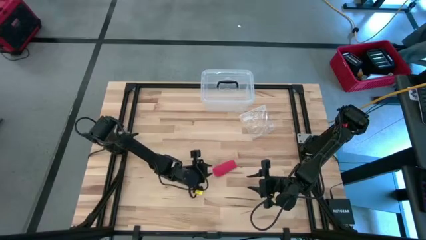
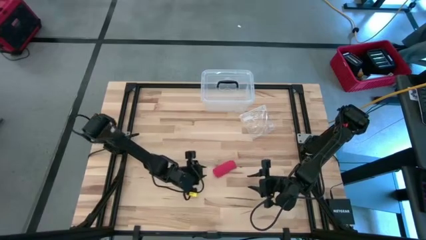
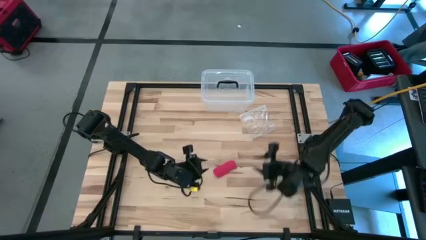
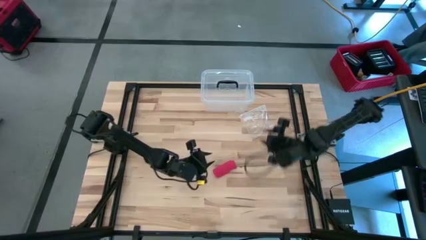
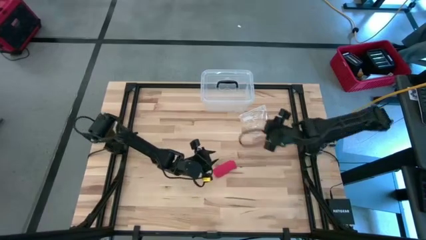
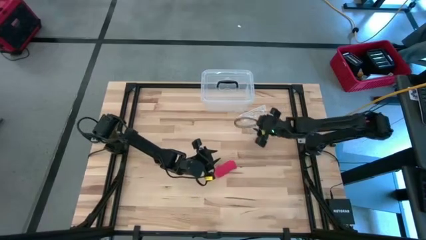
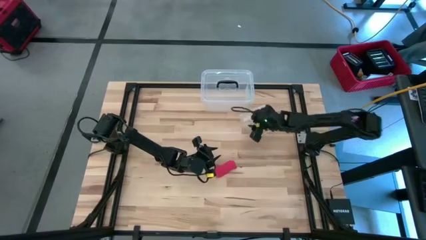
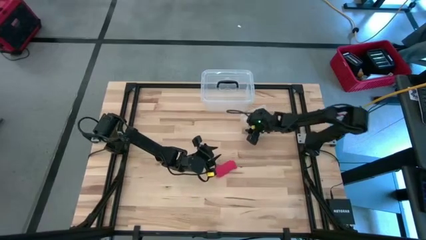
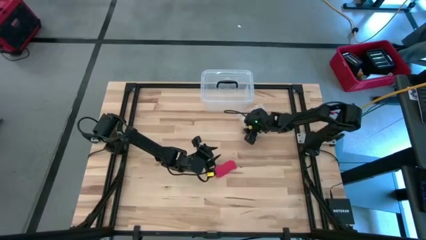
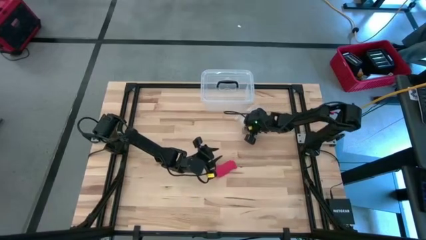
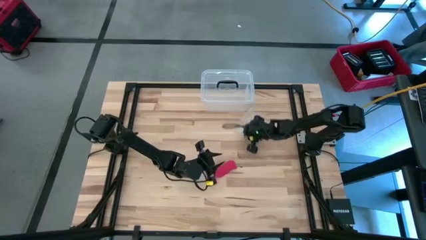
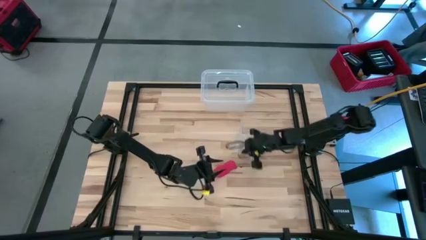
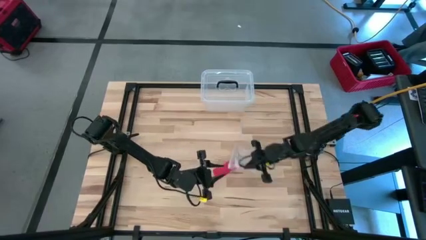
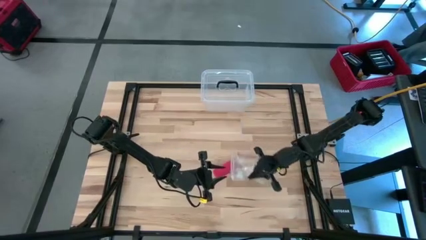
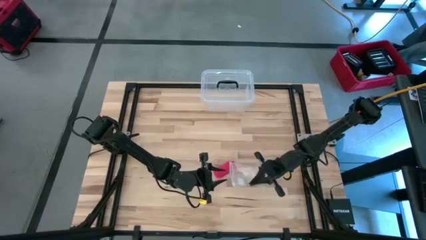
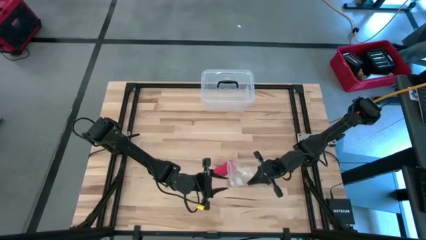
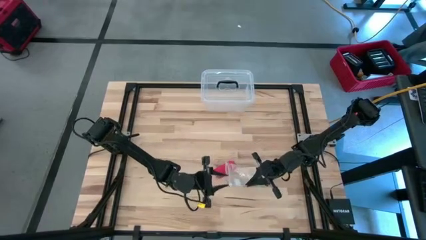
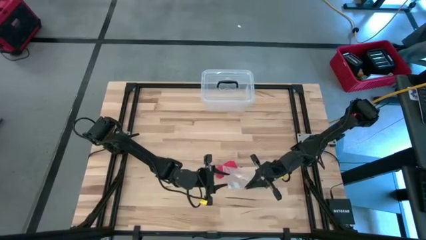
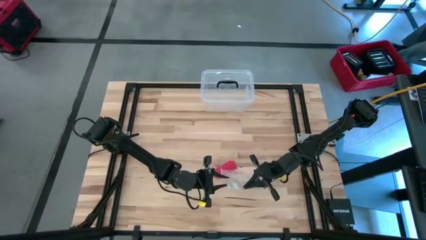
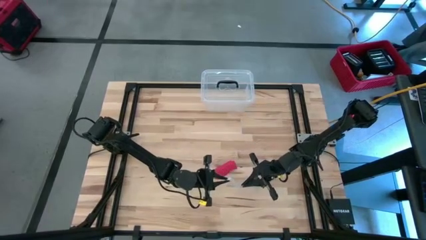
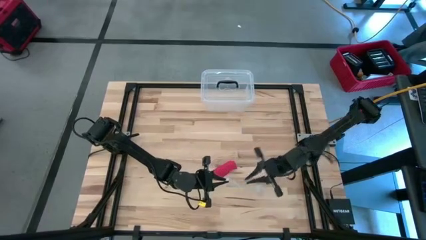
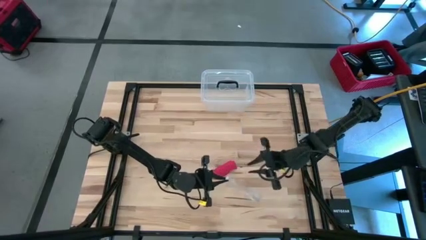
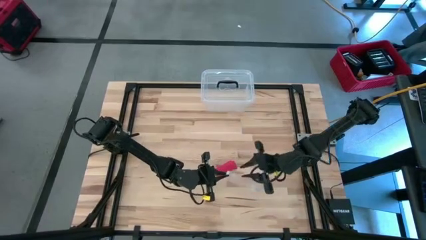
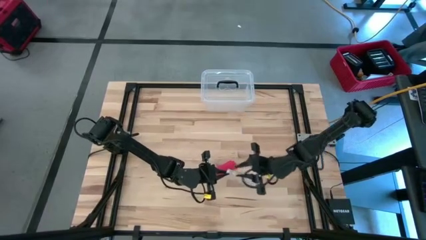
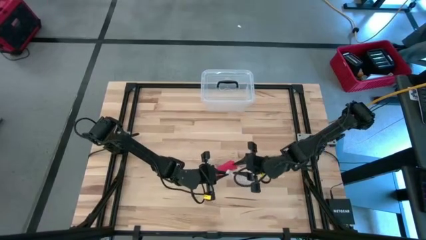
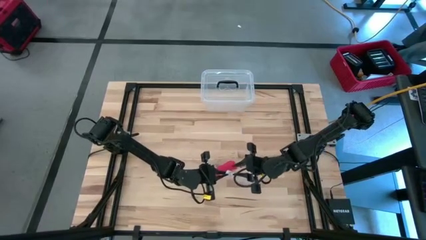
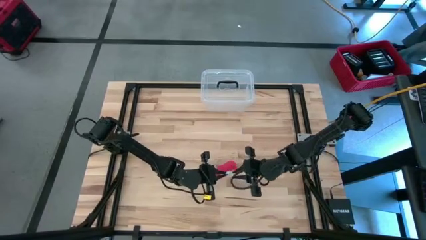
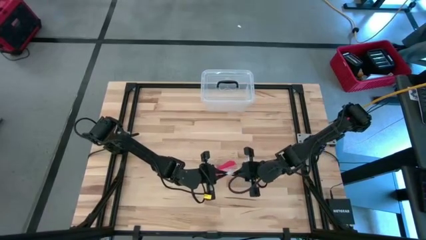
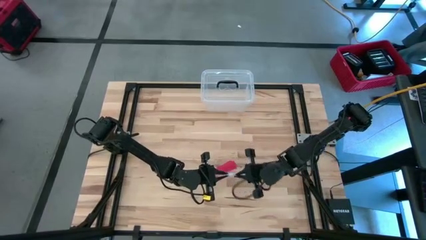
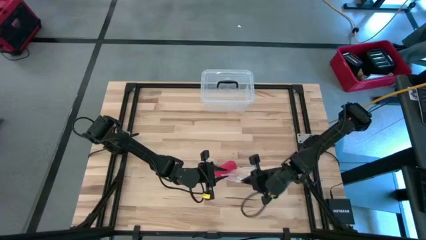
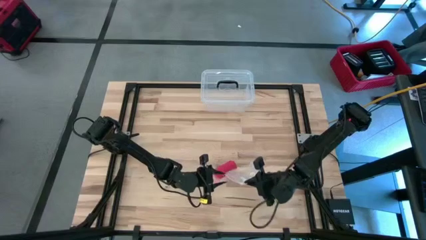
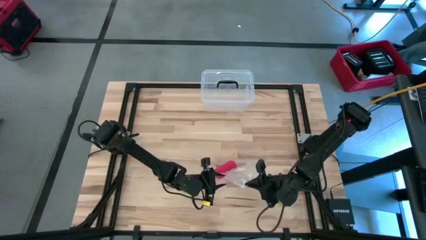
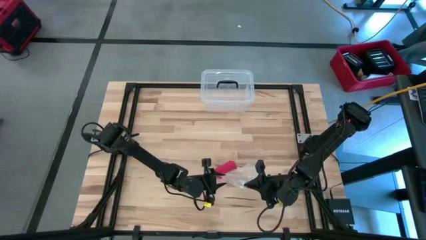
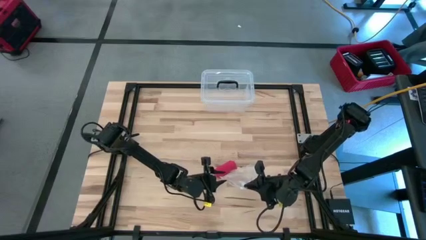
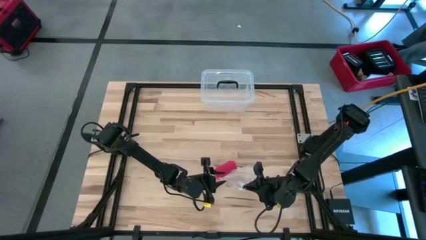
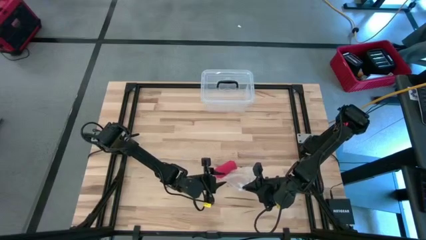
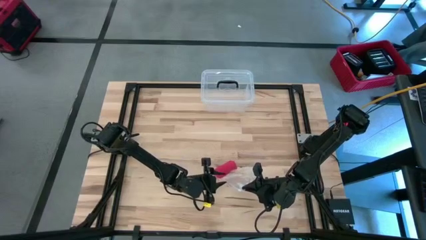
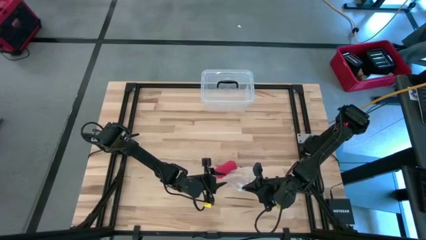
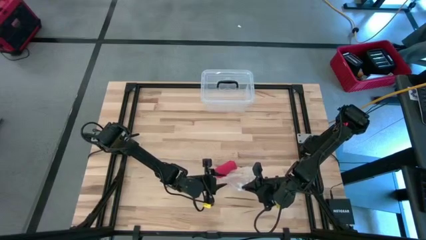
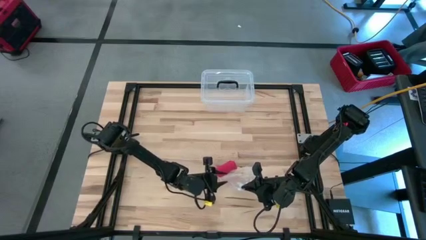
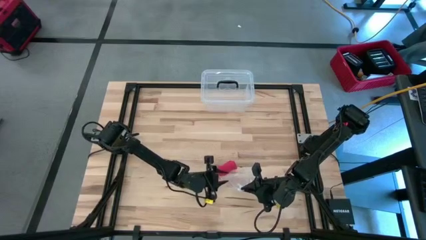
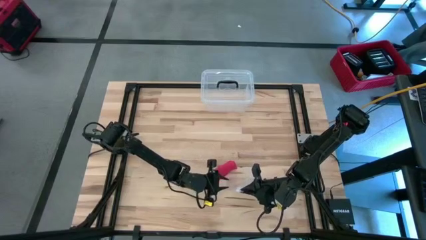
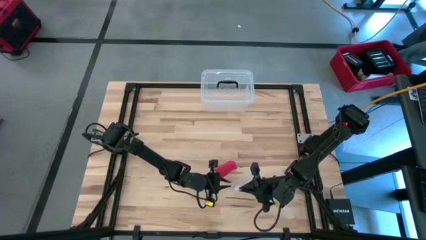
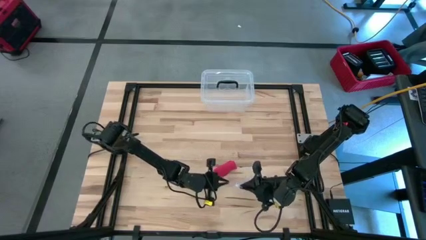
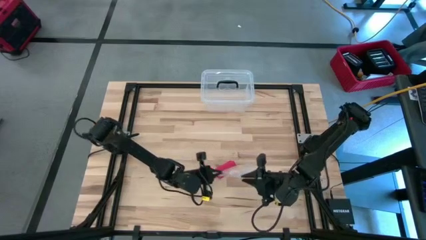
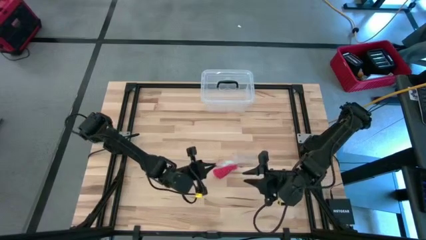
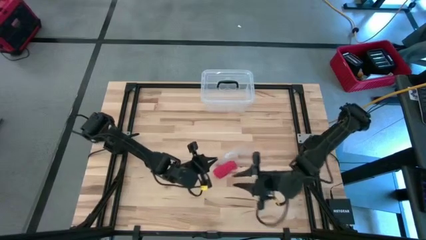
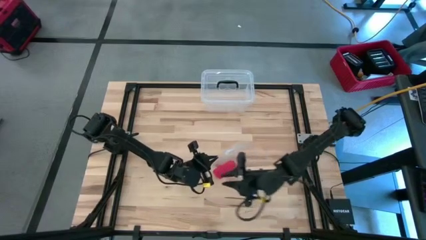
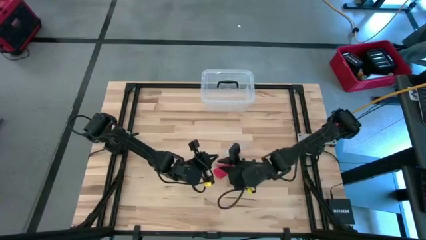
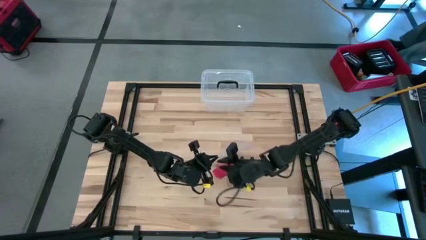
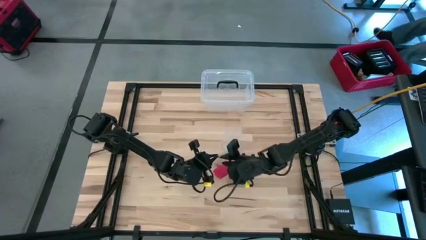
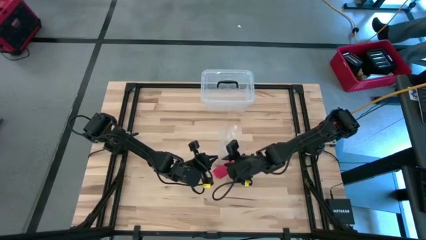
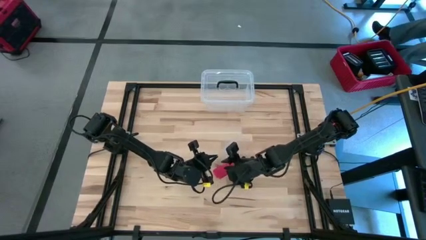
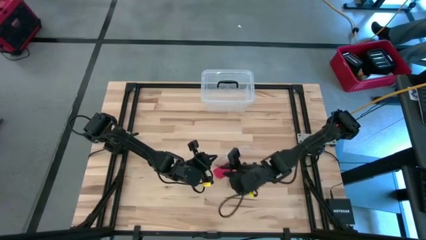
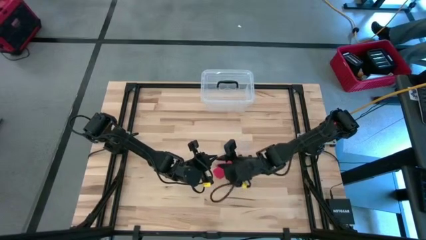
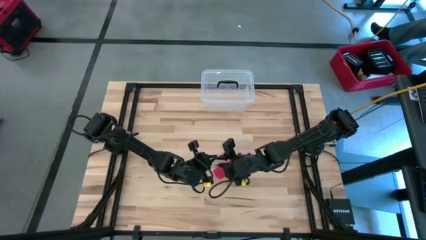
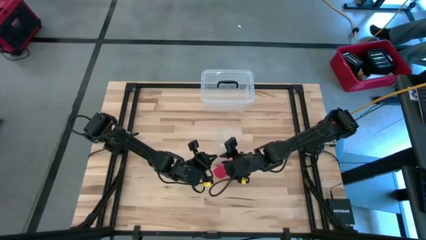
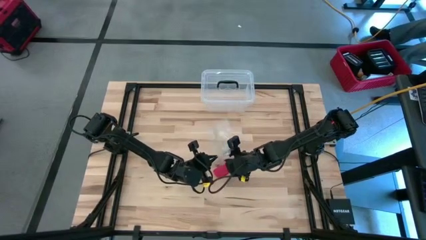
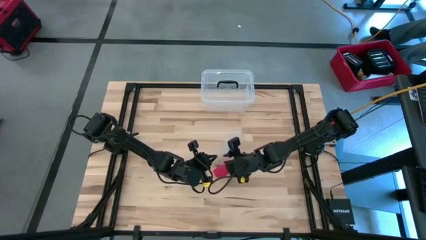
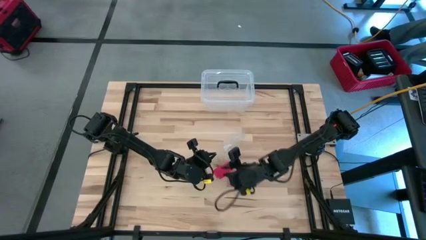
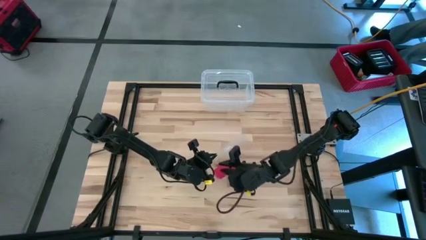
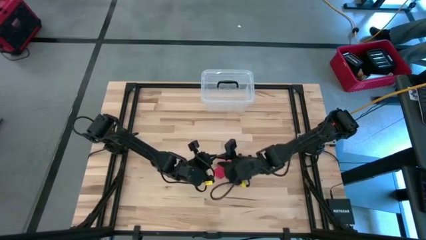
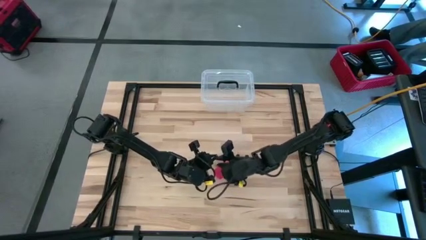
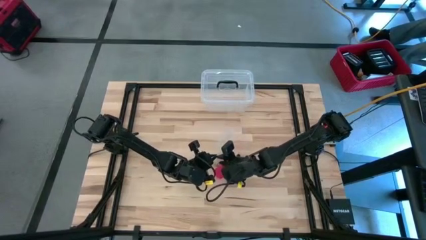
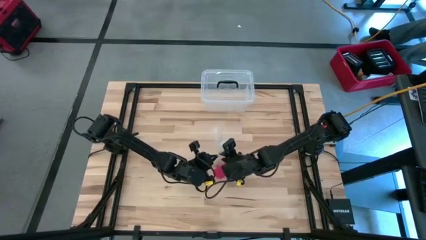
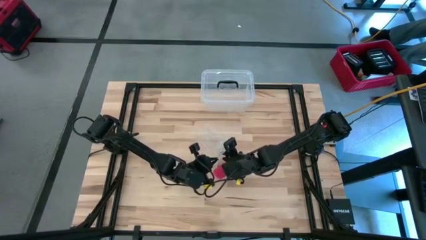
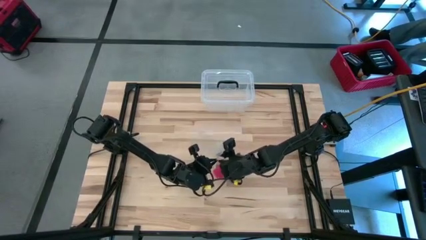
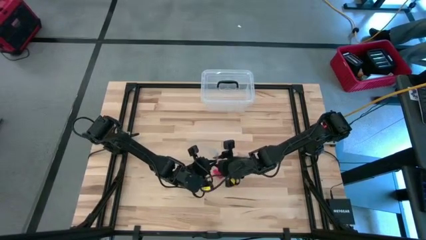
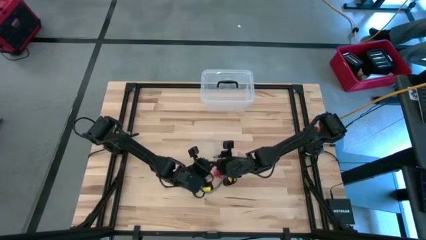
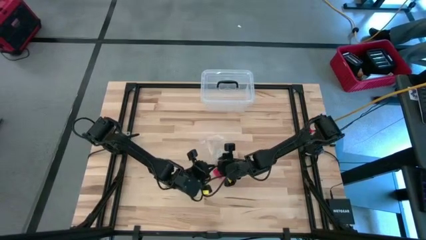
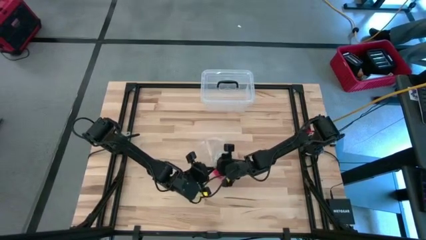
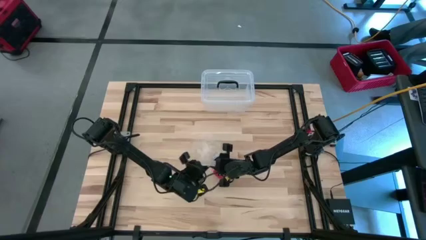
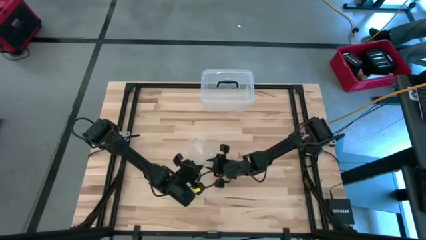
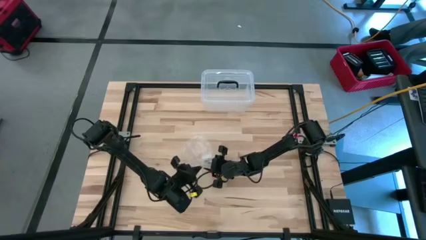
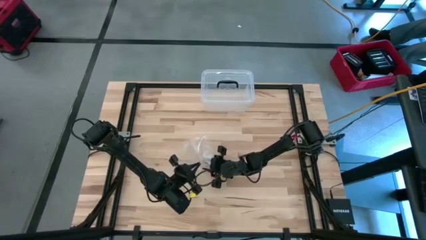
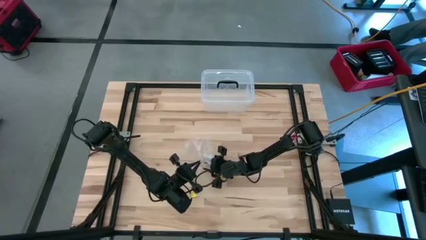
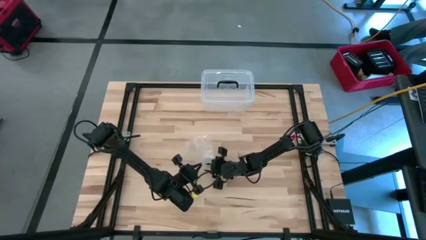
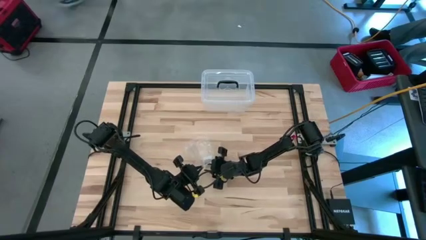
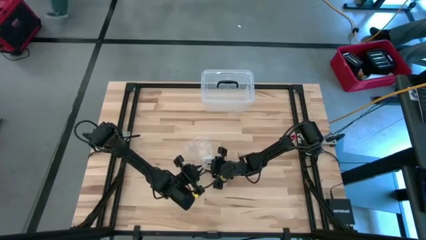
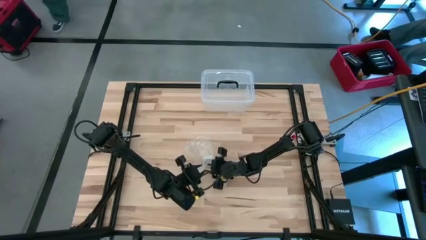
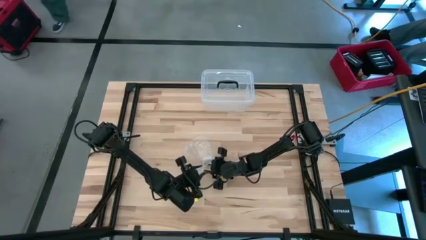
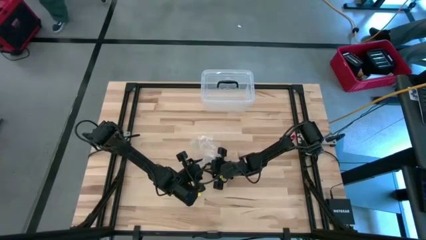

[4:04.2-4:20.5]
Task: Roll bandage
Put the red bandage into the transparent zip bag
